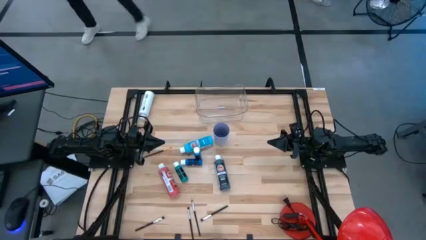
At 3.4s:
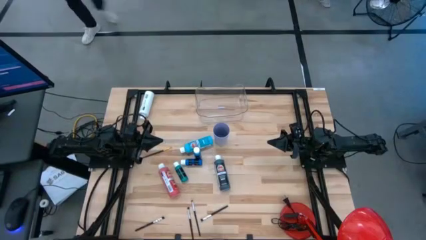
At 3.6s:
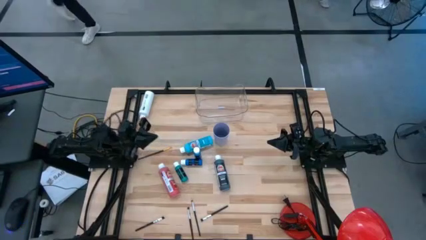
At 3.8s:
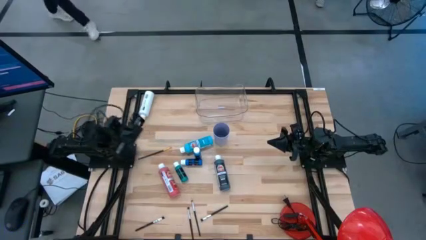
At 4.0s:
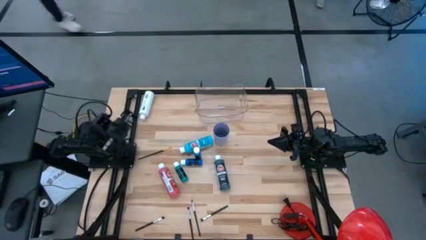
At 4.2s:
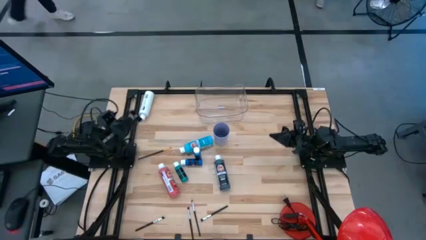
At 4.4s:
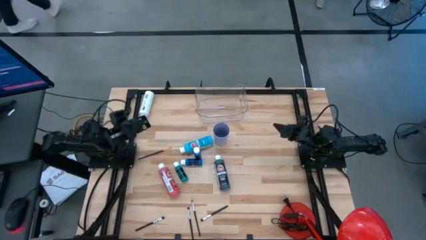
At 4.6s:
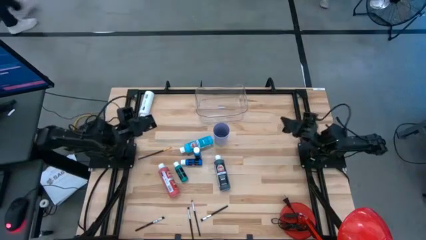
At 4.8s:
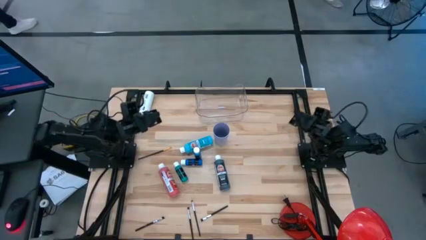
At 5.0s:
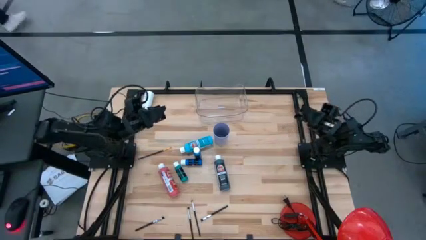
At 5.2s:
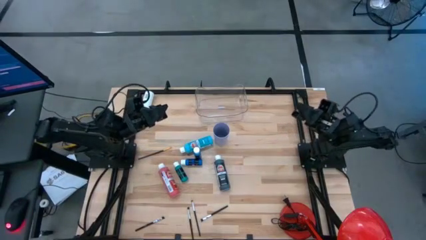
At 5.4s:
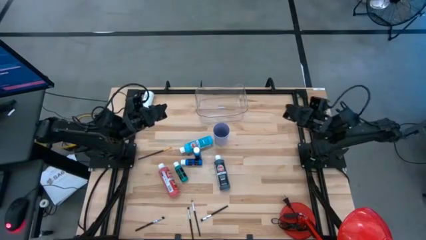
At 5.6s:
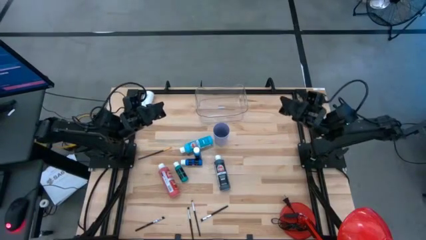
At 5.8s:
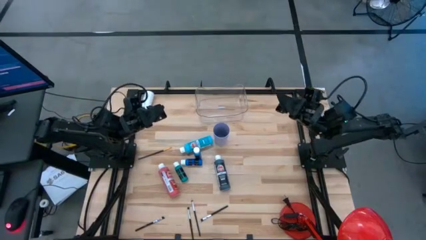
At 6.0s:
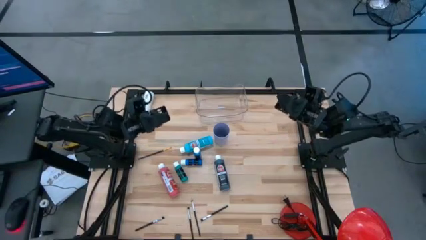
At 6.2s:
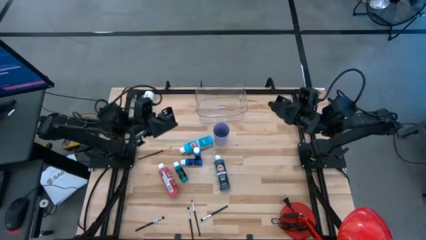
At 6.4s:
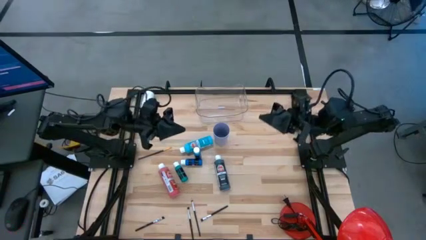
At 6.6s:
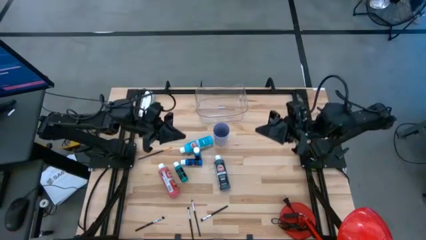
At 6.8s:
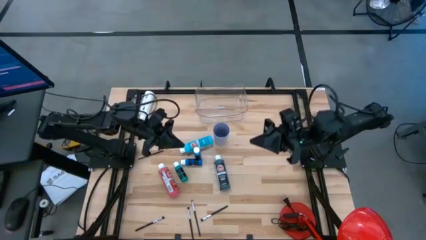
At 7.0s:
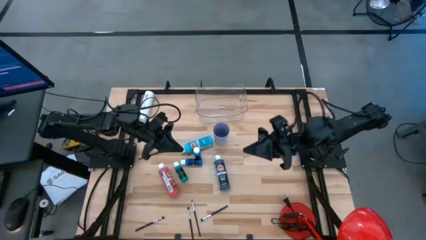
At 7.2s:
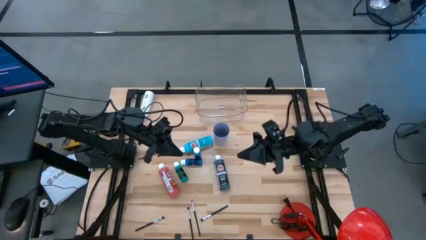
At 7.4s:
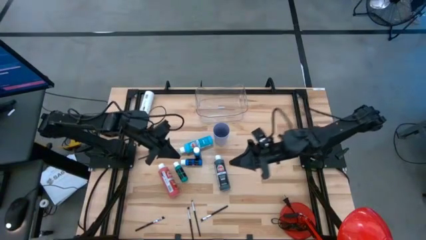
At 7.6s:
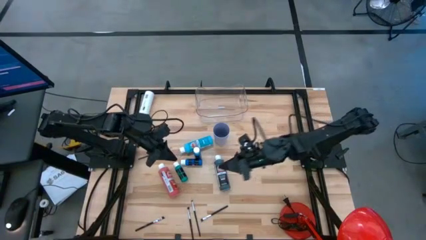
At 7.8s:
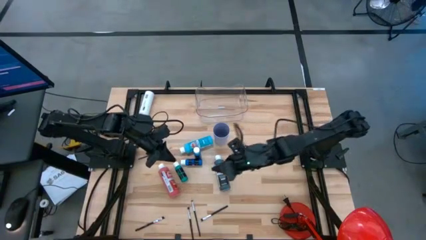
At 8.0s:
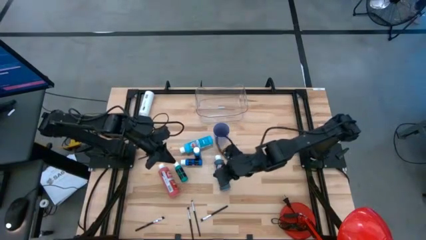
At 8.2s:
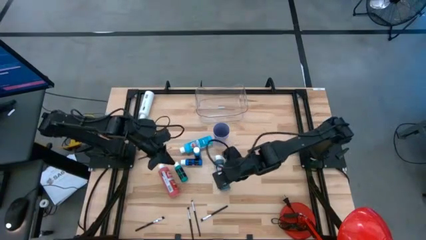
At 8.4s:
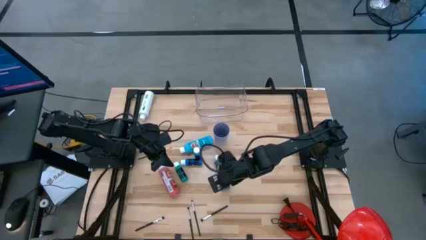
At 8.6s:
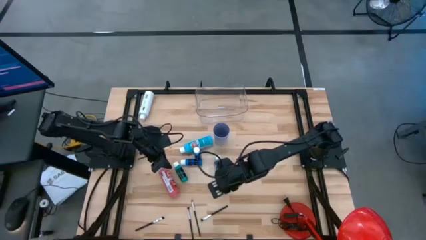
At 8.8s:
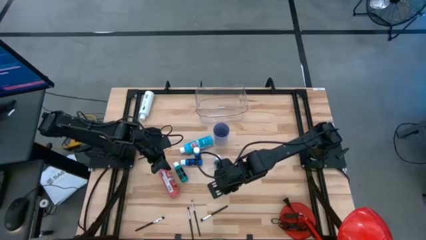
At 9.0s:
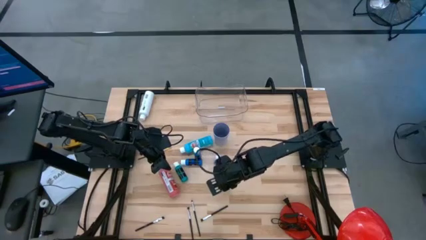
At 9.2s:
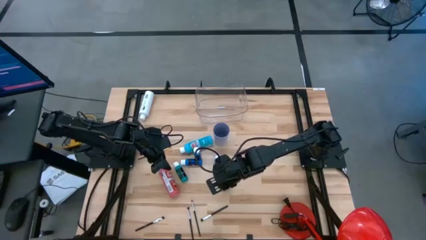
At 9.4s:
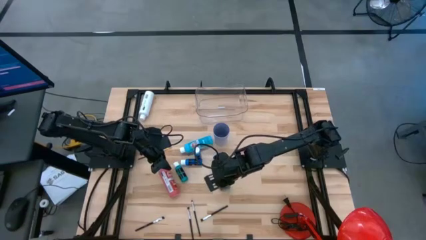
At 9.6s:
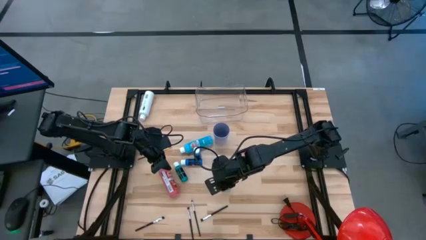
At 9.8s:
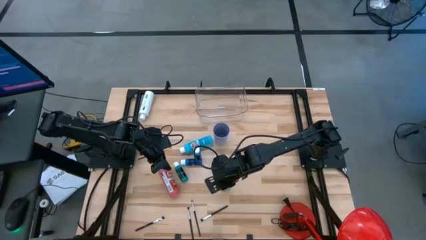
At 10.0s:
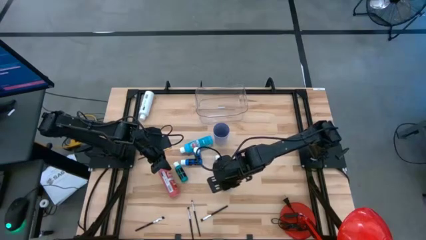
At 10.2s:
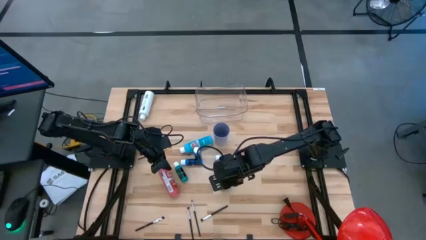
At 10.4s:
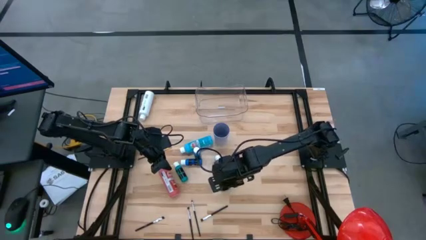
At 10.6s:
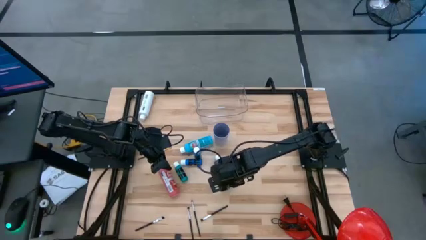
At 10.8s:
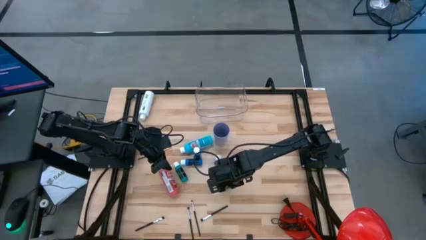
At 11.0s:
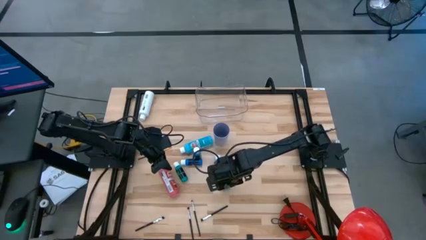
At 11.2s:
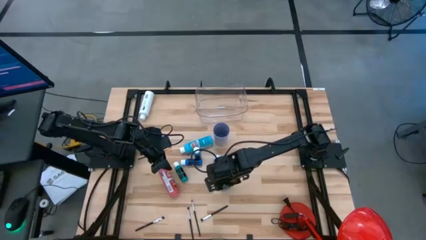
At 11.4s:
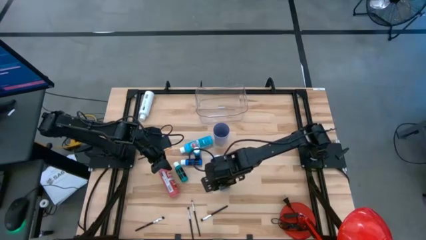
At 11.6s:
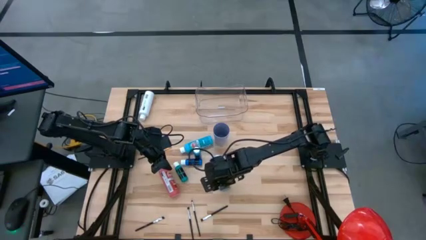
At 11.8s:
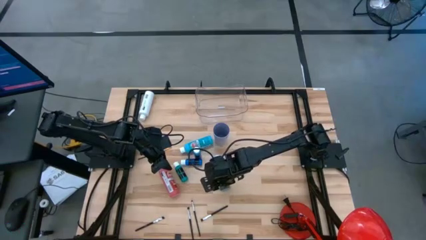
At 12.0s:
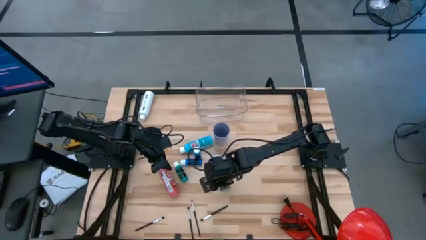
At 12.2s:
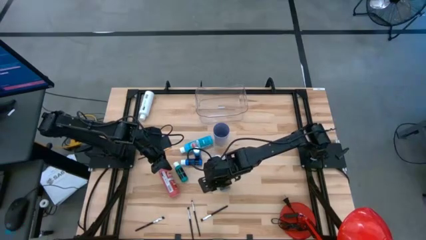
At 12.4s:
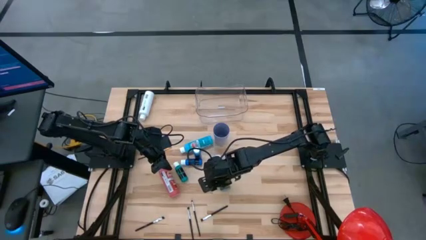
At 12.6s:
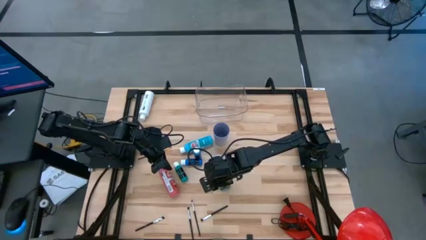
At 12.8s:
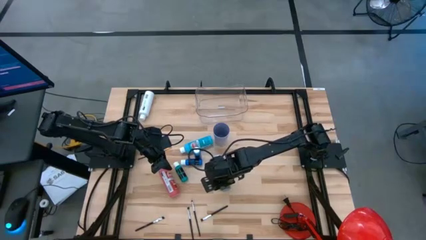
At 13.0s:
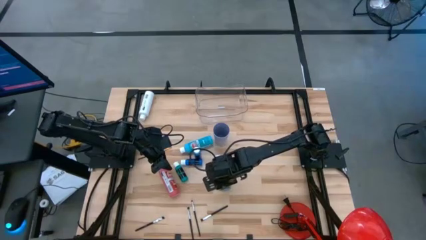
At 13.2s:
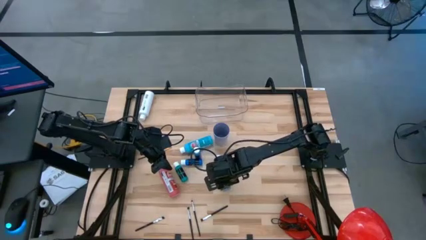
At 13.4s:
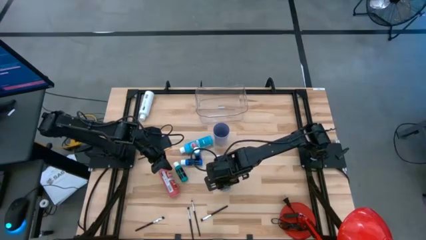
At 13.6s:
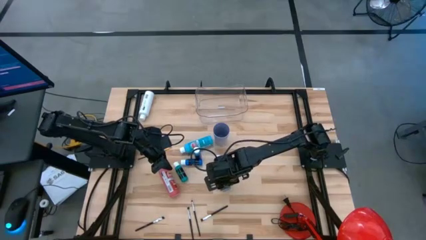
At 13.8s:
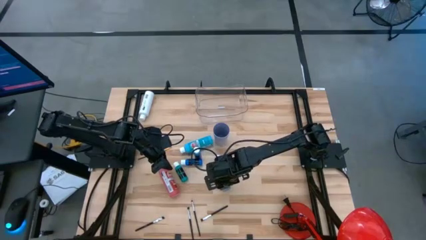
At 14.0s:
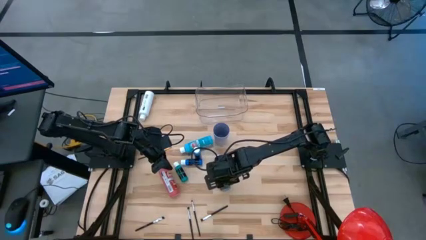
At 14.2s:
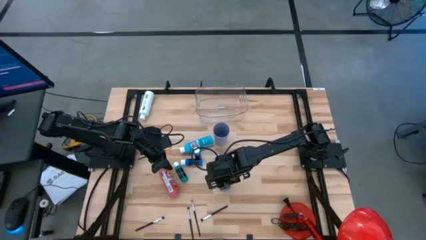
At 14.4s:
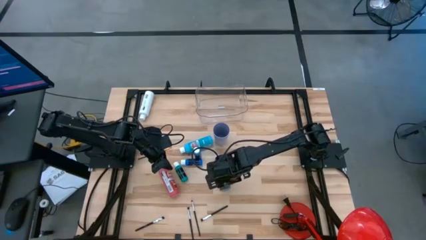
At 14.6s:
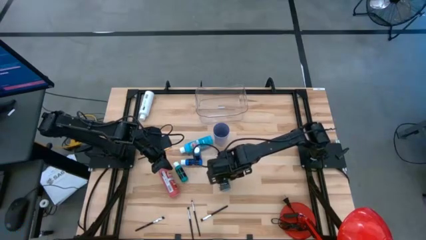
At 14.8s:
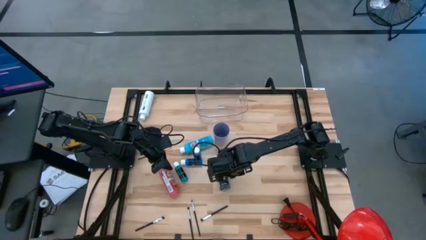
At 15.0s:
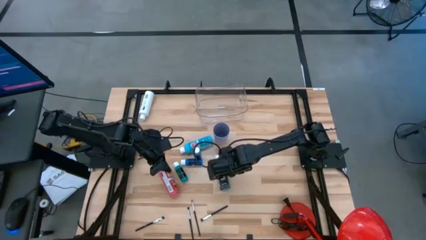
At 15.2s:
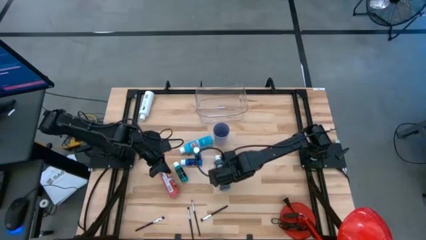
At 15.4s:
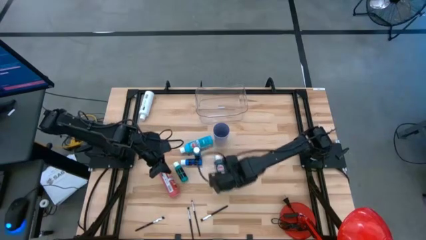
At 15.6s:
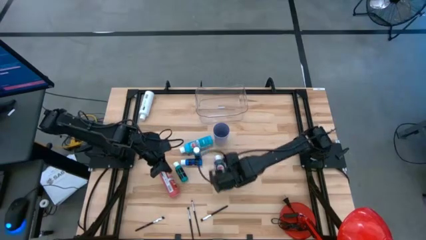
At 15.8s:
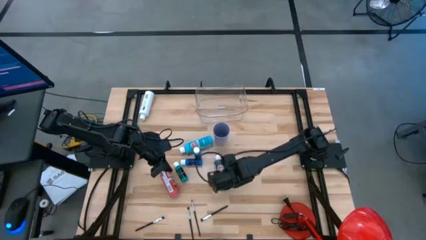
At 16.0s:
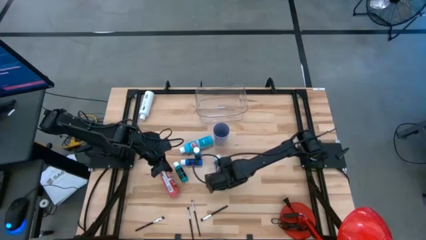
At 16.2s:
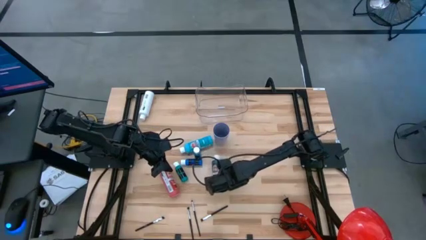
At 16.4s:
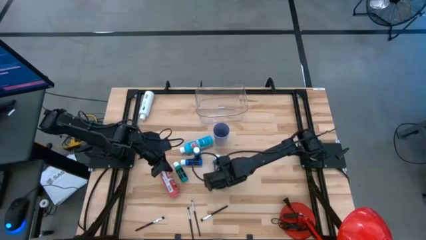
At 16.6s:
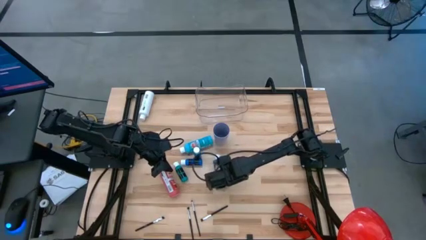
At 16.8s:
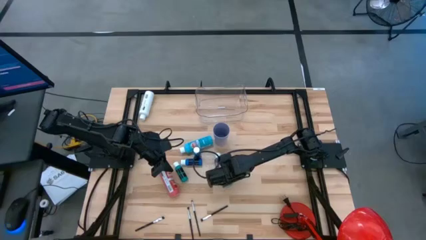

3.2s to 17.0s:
Task: Pick & Place Paint Supplies
Put the black paint bottle into the transparent bin
